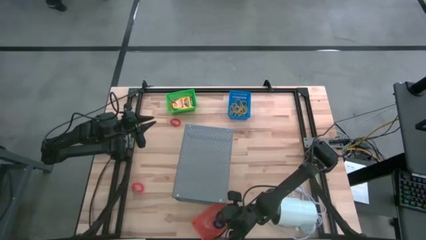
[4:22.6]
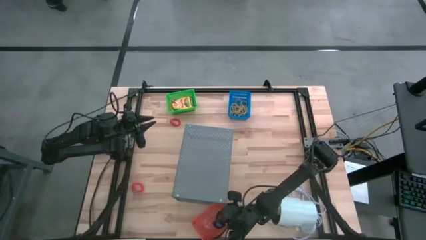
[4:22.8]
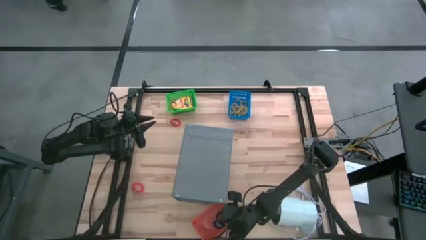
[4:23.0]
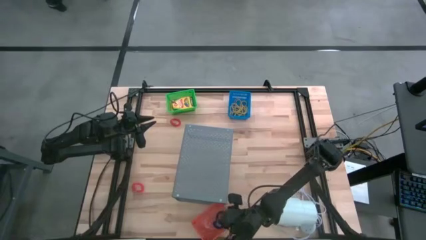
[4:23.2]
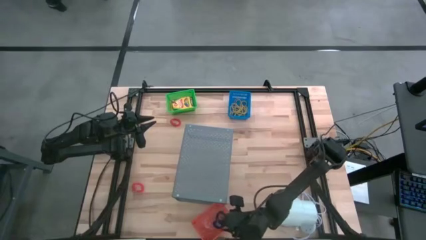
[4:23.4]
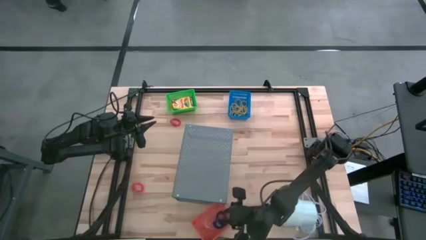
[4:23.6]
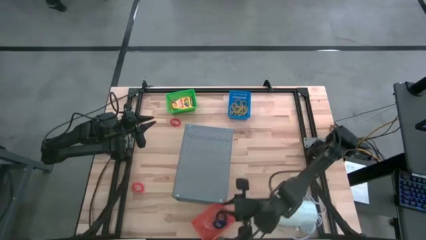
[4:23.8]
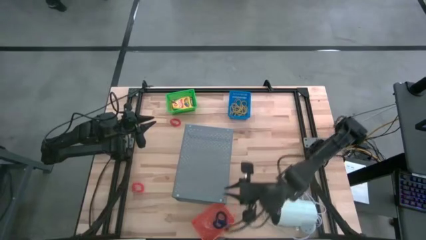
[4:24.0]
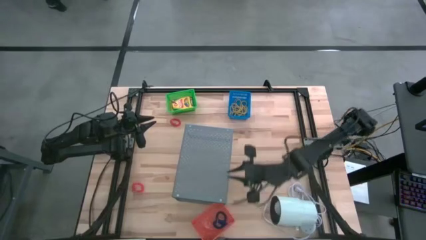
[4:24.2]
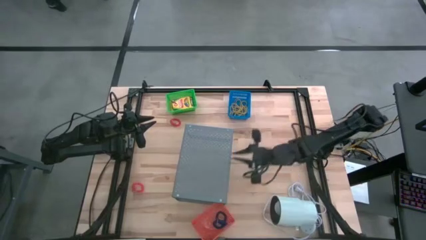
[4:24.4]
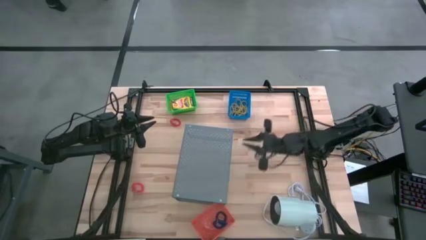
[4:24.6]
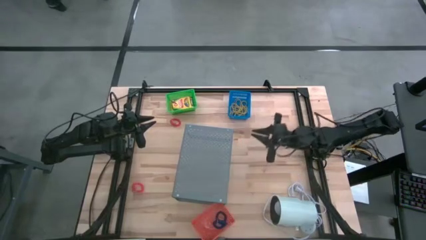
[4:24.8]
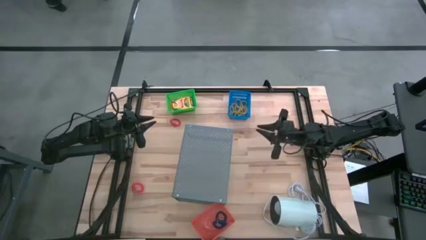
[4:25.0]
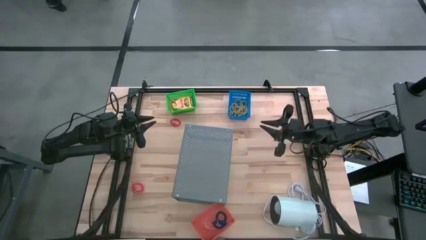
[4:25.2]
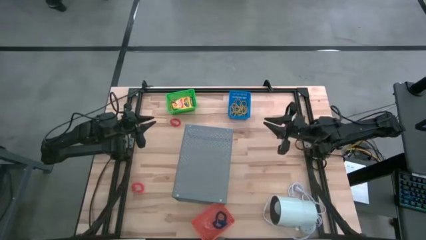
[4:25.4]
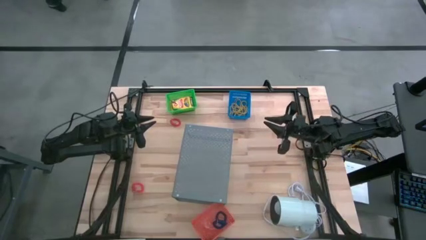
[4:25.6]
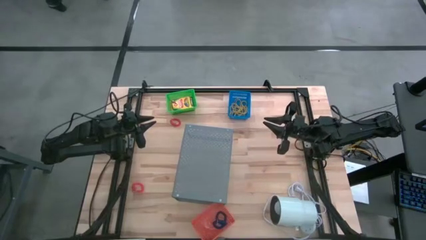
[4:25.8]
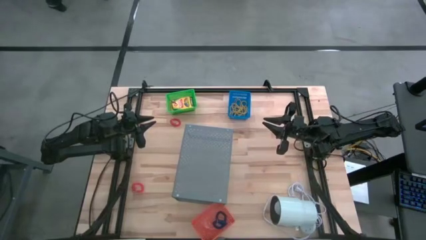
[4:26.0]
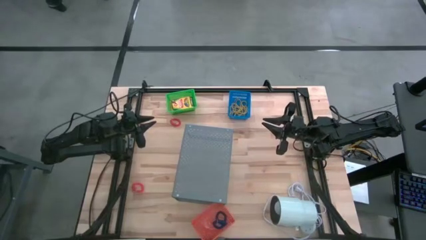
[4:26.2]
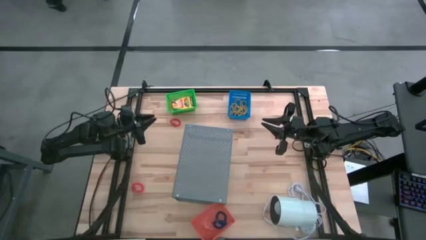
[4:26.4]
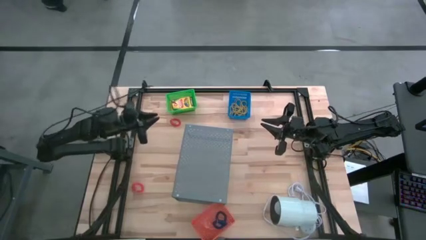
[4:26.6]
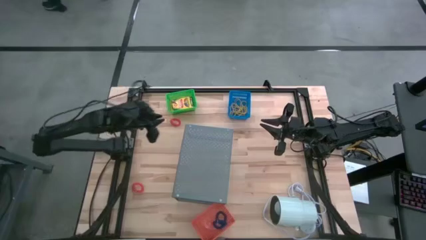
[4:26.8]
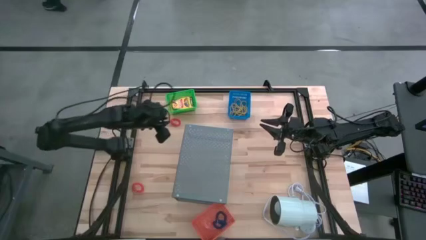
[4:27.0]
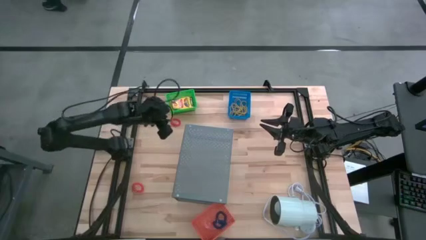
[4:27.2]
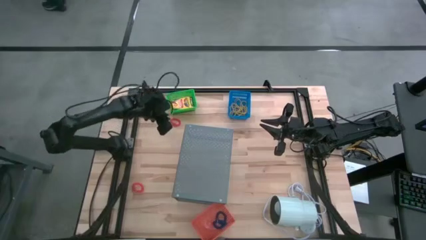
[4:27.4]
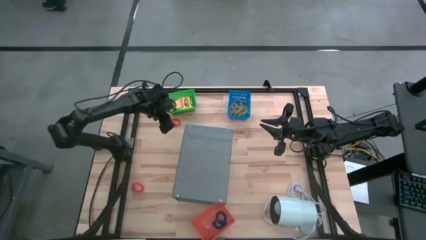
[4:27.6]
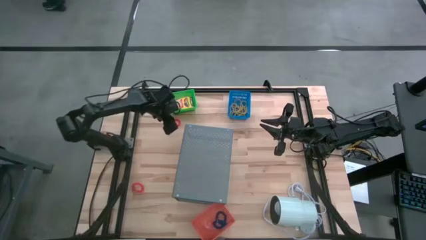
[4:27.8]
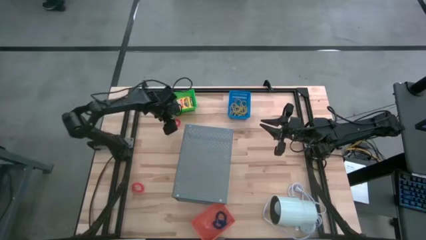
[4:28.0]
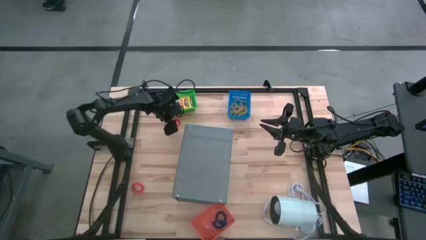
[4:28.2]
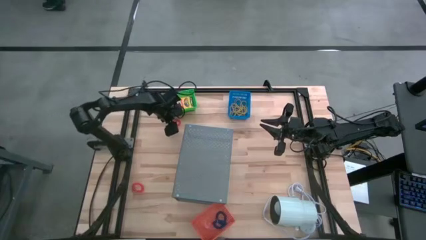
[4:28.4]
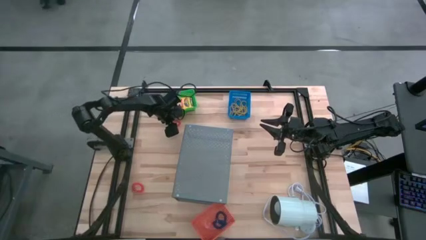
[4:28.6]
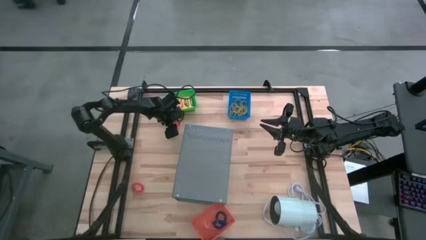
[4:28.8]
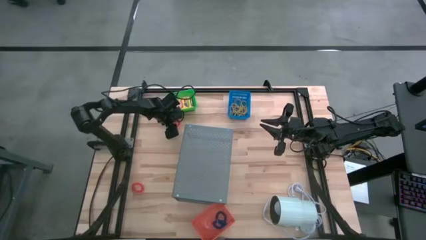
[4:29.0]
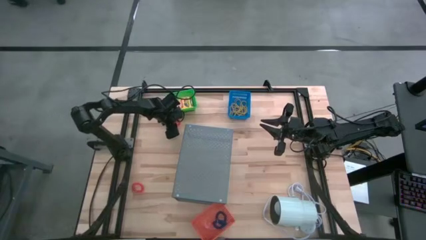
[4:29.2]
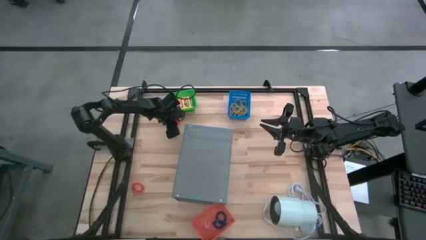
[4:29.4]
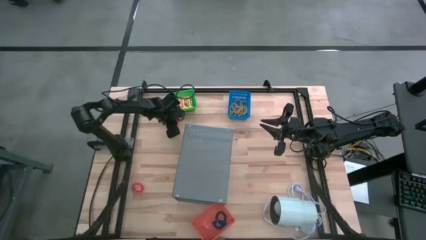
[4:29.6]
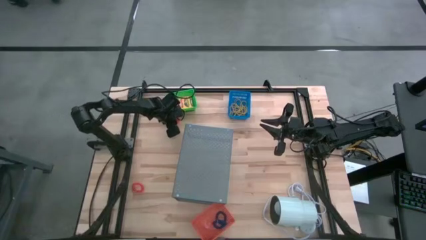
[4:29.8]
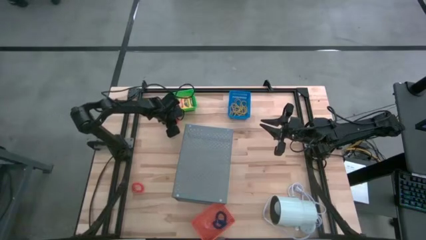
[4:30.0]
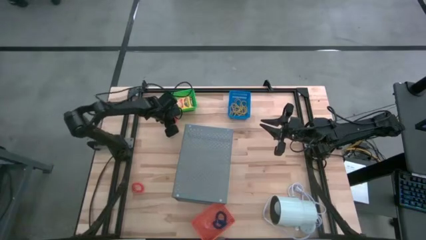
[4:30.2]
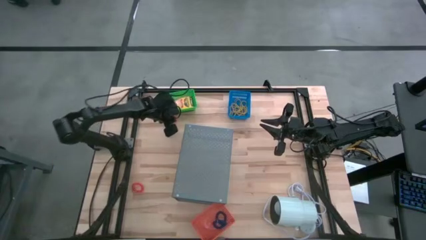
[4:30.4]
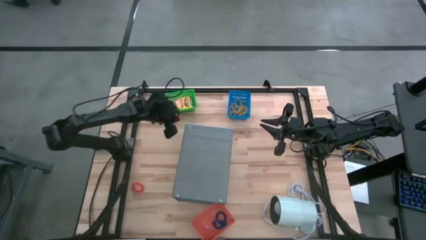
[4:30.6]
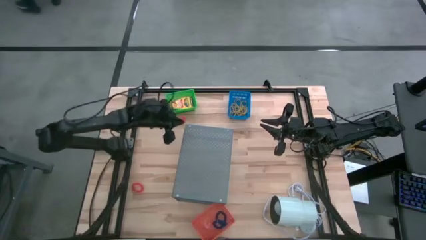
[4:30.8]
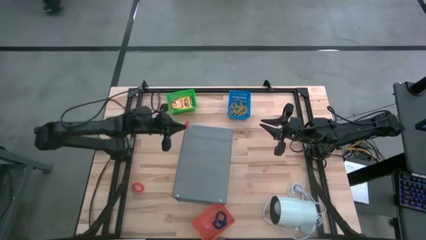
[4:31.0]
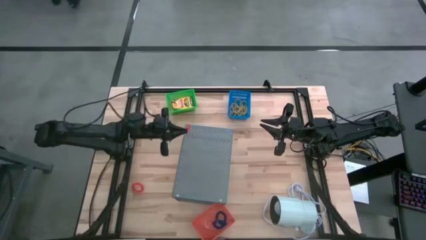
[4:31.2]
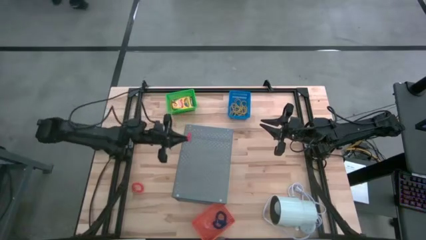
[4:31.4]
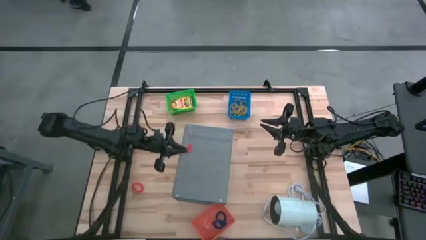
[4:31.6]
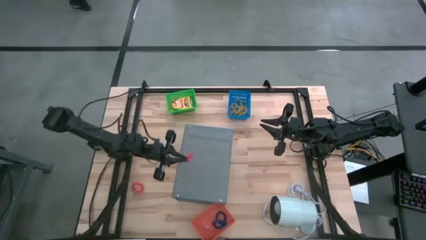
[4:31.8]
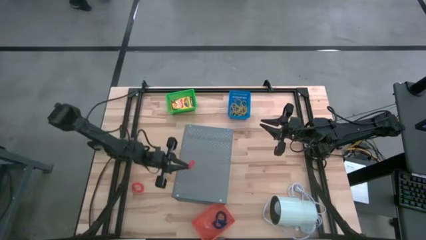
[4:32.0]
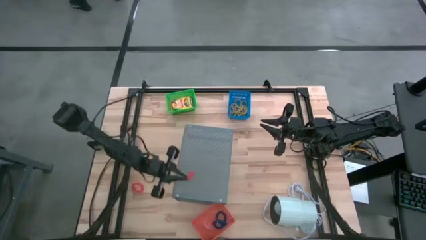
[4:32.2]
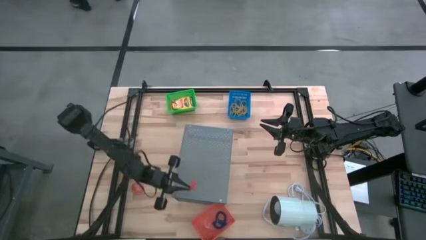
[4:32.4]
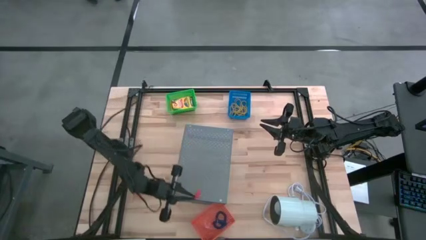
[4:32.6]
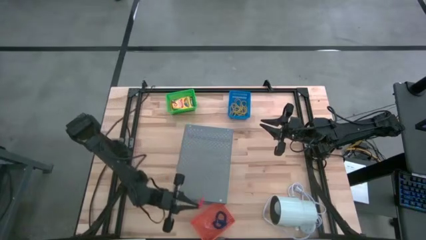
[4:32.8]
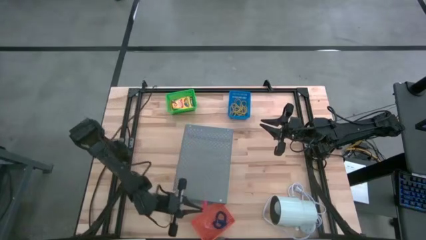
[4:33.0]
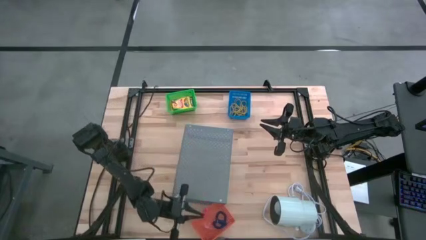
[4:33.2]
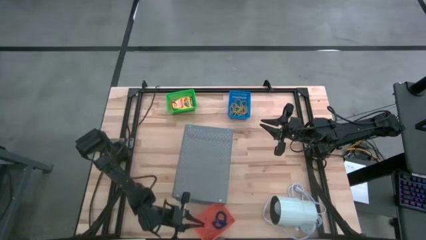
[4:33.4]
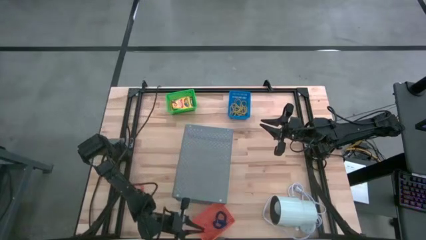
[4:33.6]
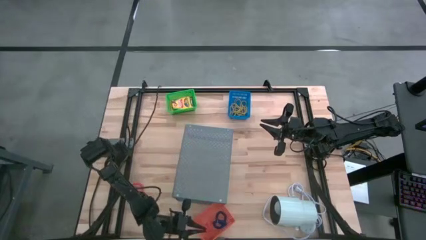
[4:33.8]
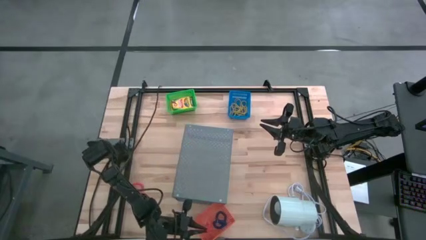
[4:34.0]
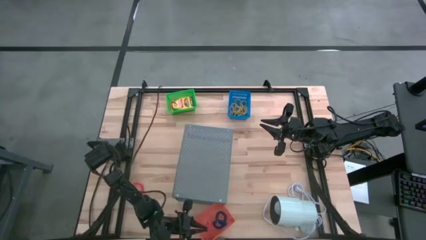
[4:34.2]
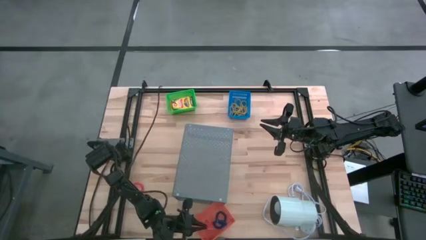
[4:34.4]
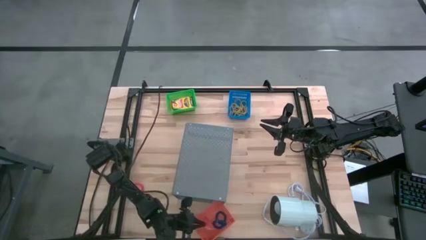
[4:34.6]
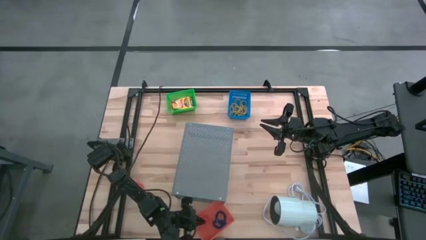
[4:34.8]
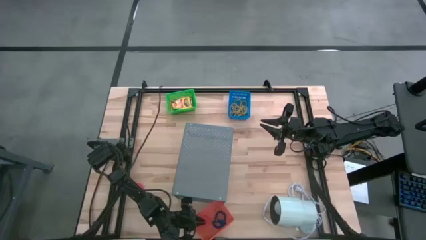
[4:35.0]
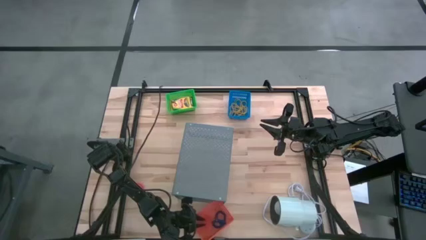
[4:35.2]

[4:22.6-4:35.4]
Task: Pick & Place Office Desk Supplies
Put the top orange spring keychain into the orange basket

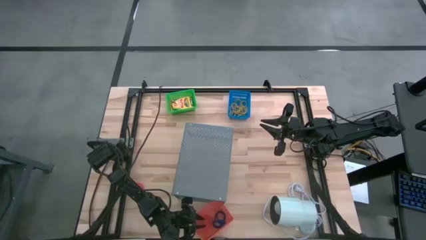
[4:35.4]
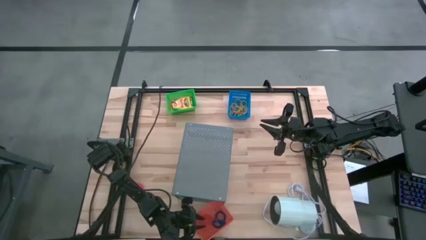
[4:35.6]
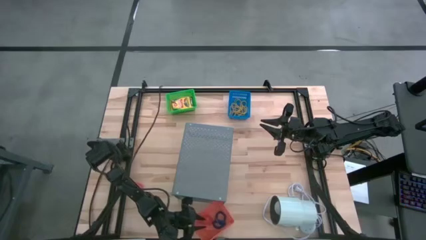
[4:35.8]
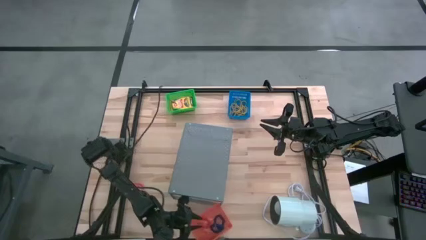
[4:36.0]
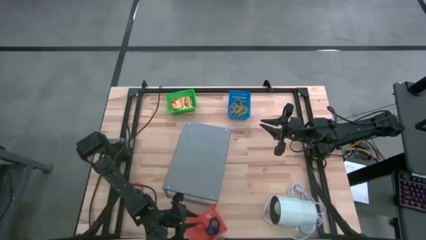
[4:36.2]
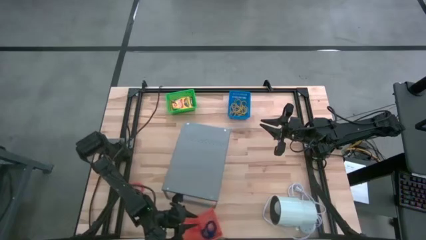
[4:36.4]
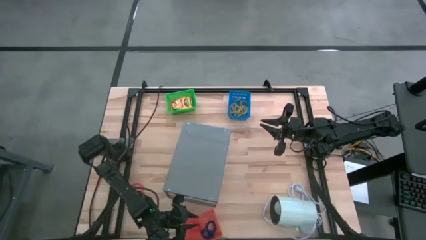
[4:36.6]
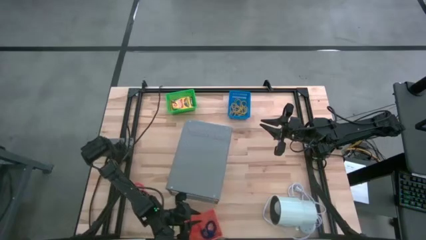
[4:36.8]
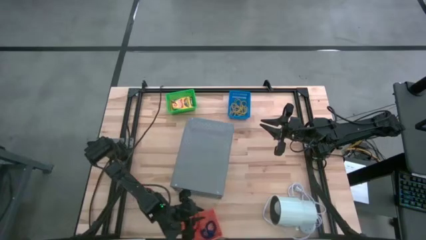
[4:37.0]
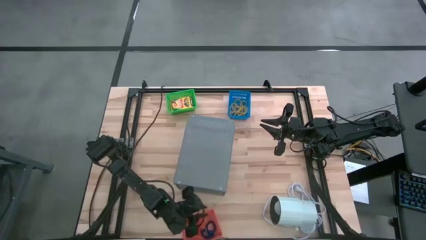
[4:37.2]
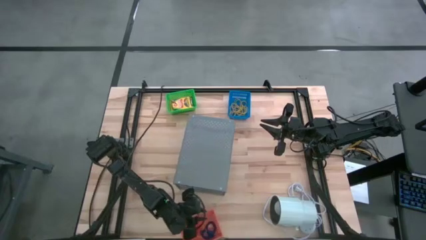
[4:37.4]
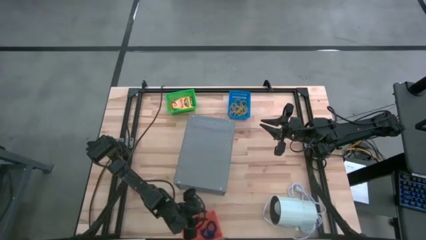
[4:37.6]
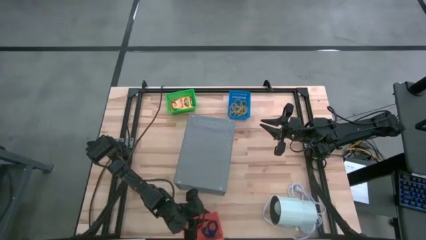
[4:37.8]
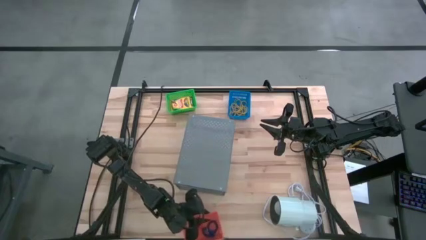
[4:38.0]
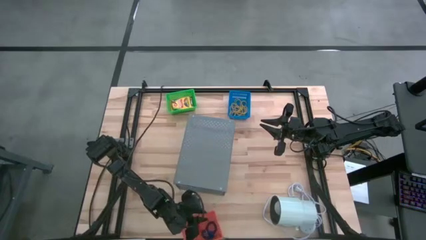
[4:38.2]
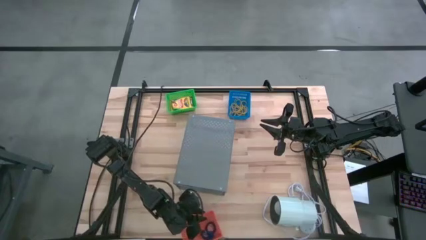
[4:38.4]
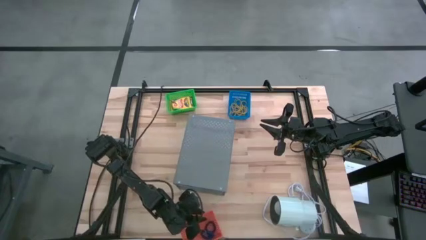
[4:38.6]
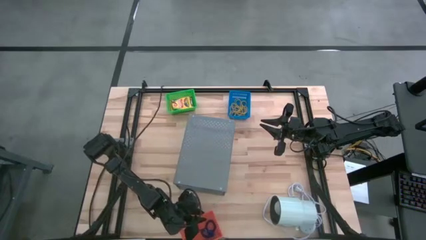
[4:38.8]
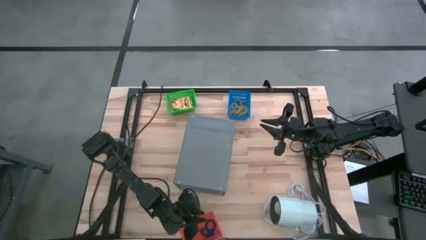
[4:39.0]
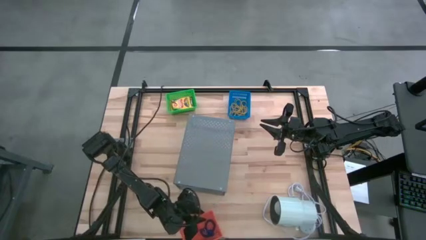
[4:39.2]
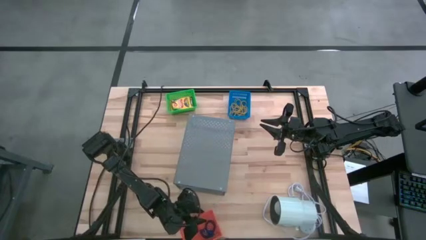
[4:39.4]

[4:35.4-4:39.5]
Adjust the orange basket on the table
